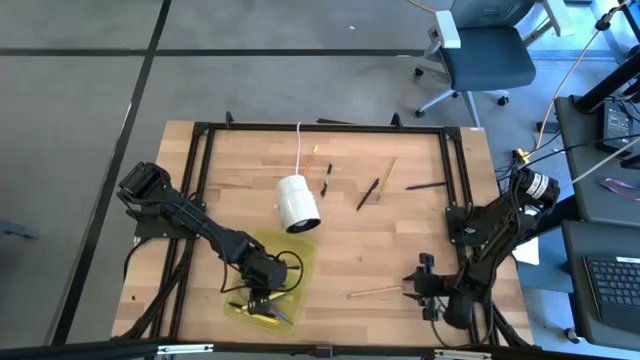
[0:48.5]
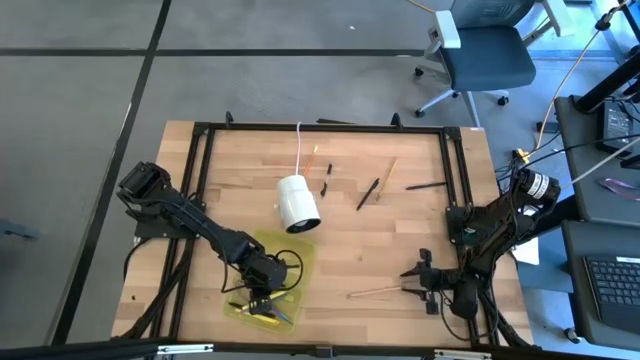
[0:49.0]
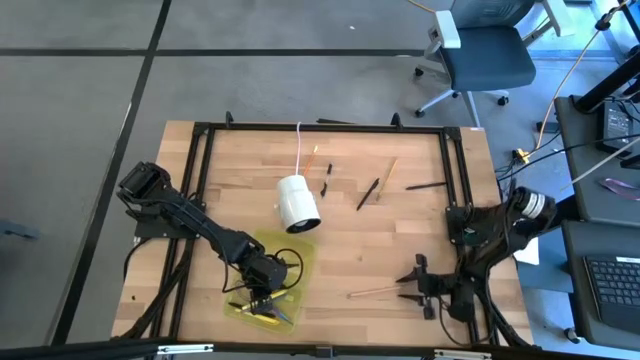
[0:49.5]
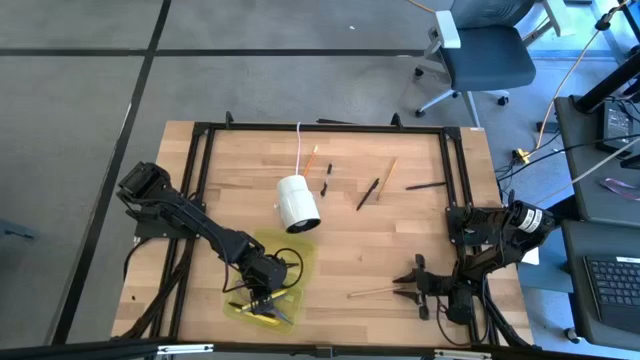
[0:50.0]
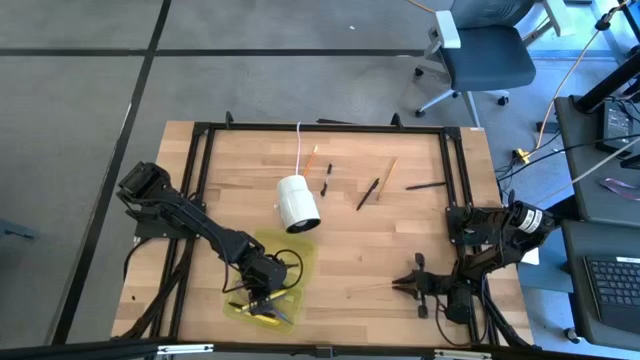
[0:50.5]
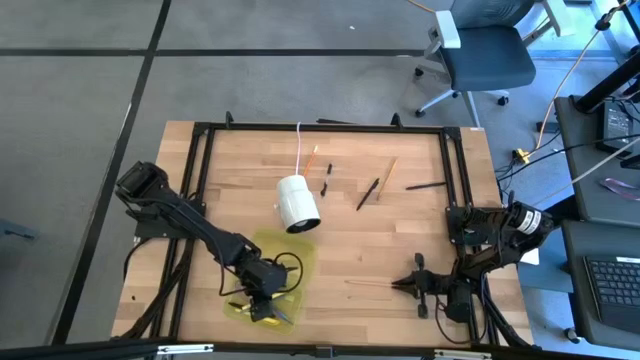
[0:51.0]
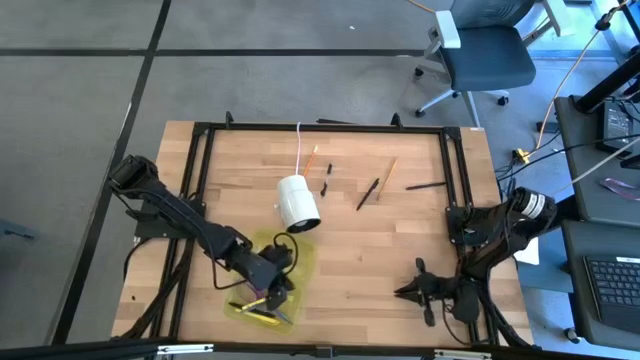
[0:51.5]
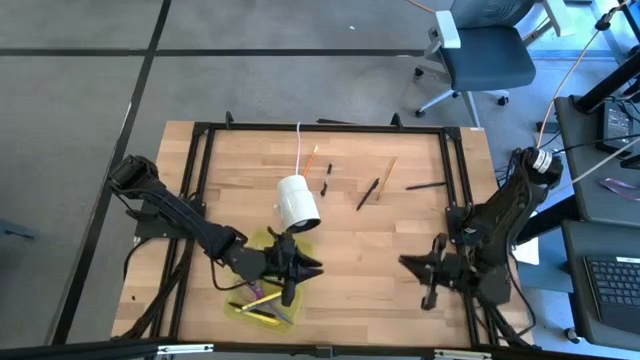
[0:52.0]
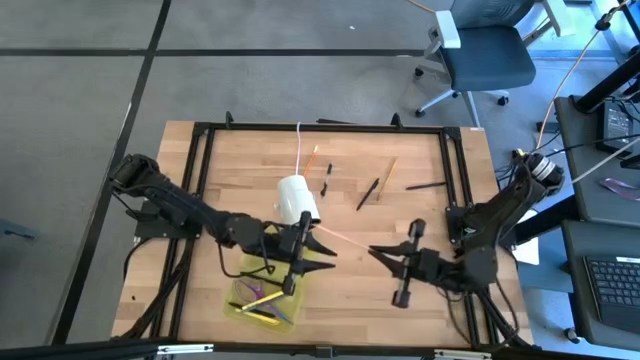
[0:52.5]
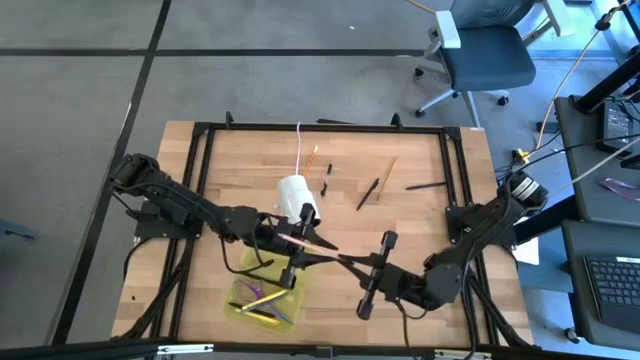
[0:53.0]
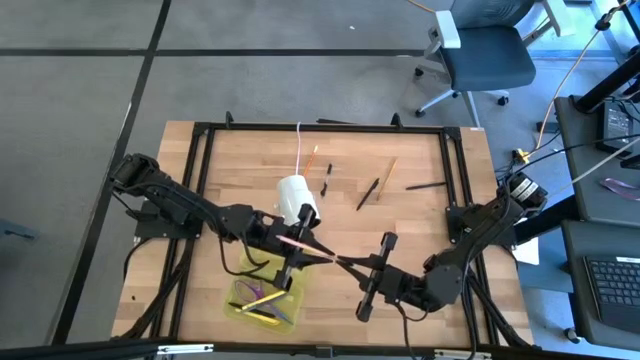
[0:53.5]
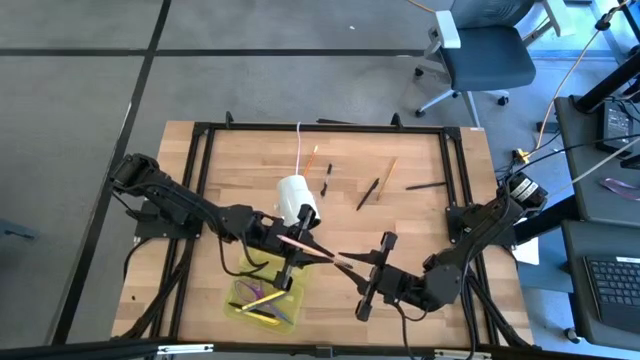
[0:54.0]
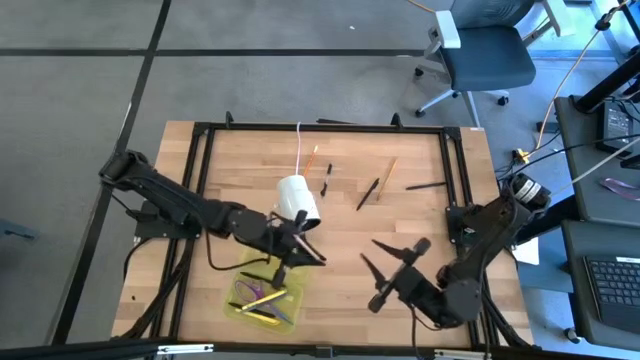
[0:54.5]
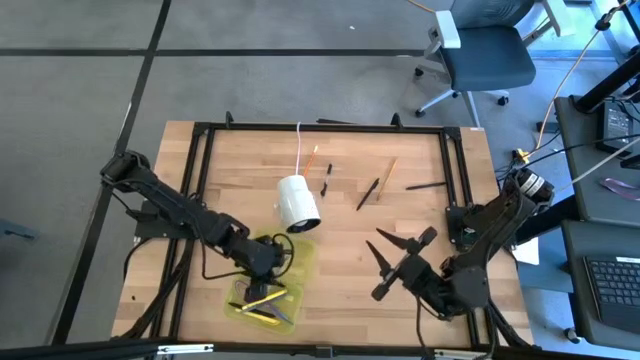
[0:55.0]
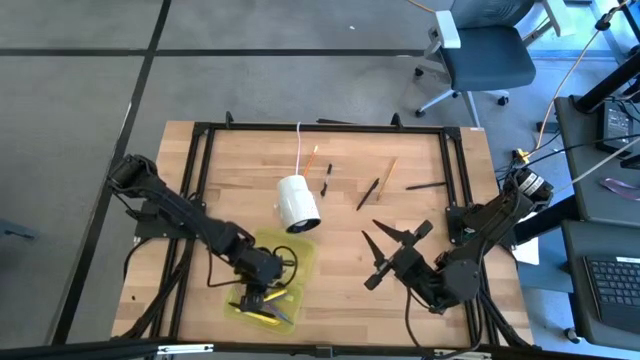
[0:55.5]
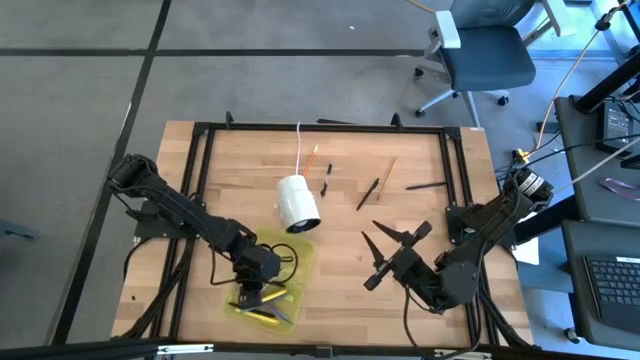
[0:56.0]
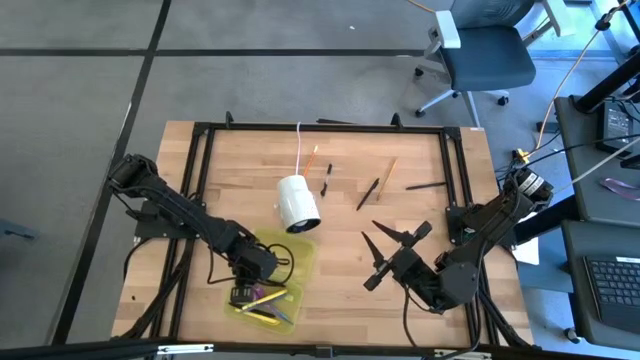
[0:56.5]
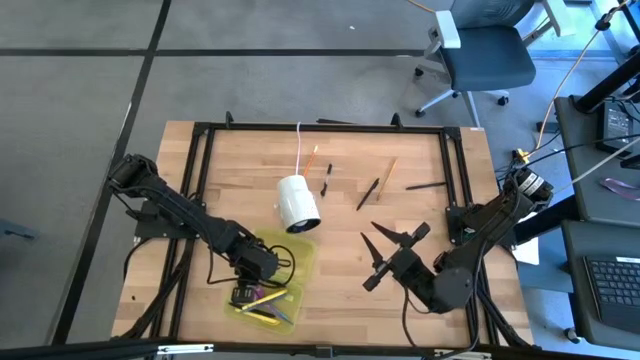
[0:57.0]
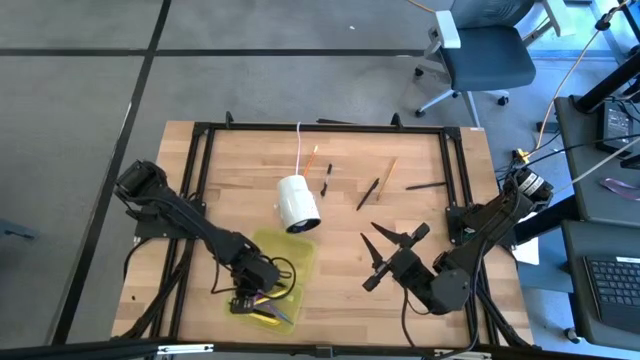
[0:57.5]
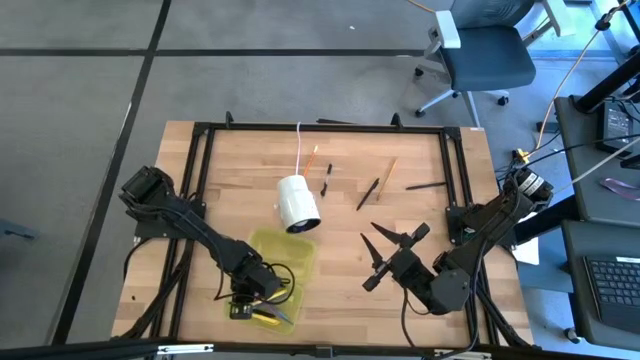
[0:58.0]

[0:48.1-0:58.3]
Task: Pick & place school supplies into a supply box
Put the wood pencil into the supply box

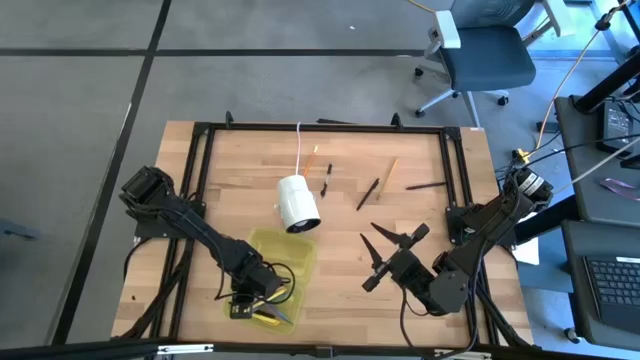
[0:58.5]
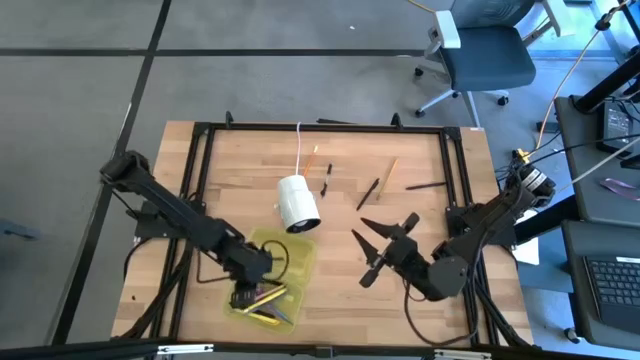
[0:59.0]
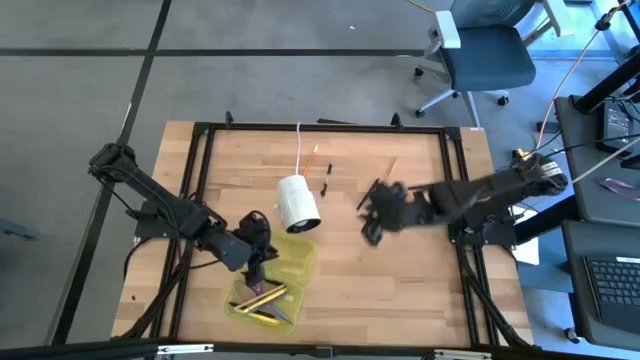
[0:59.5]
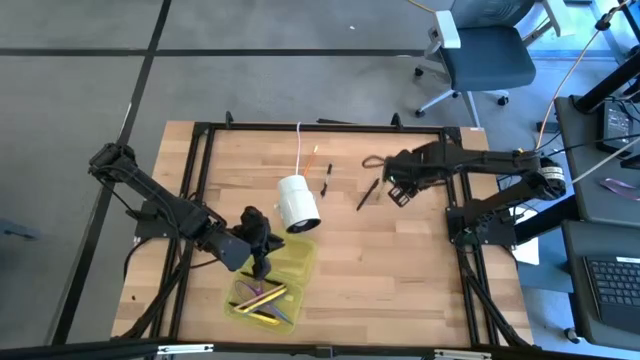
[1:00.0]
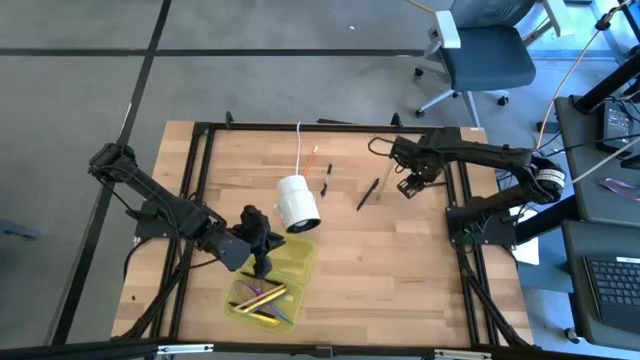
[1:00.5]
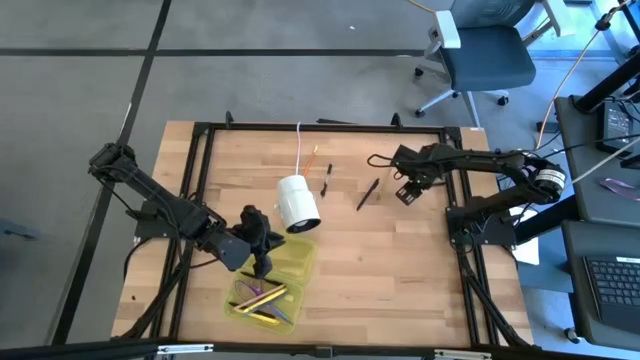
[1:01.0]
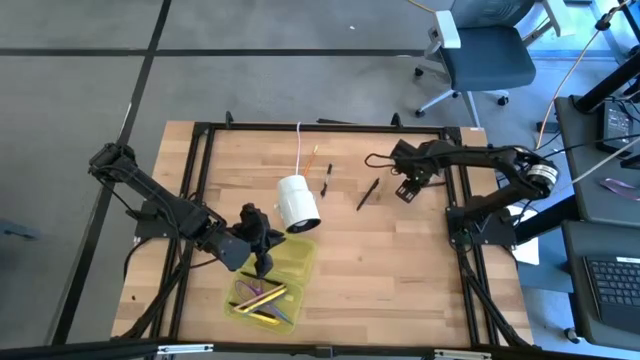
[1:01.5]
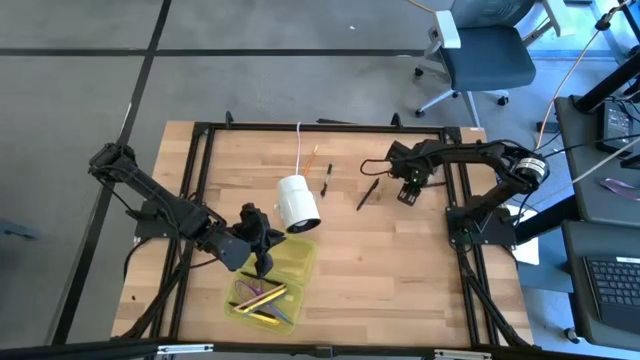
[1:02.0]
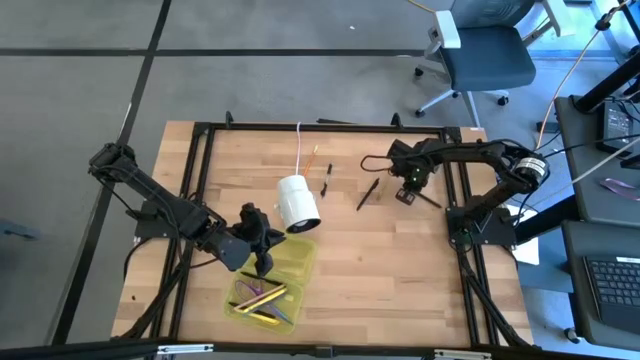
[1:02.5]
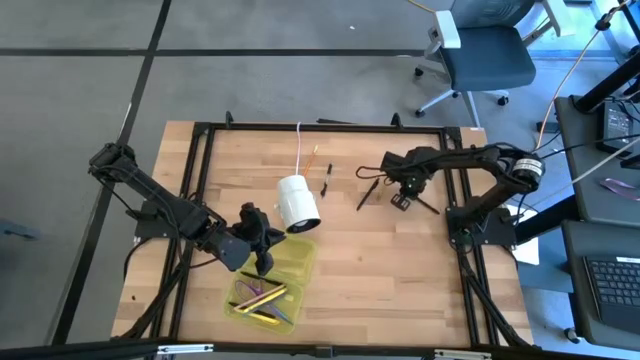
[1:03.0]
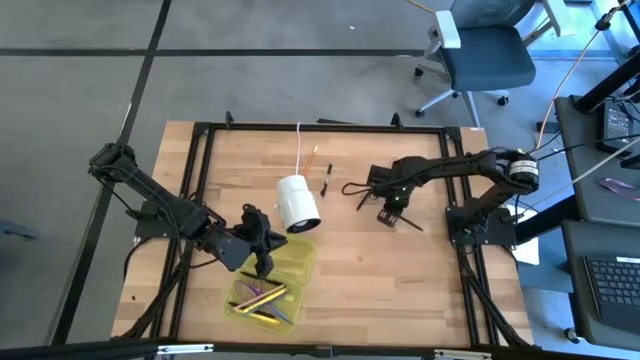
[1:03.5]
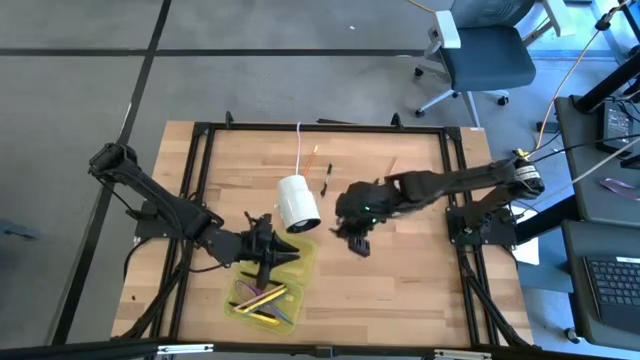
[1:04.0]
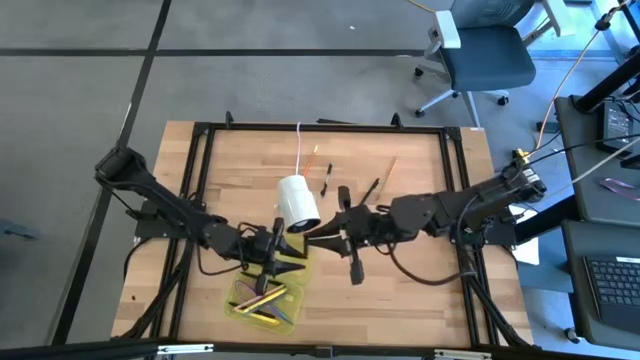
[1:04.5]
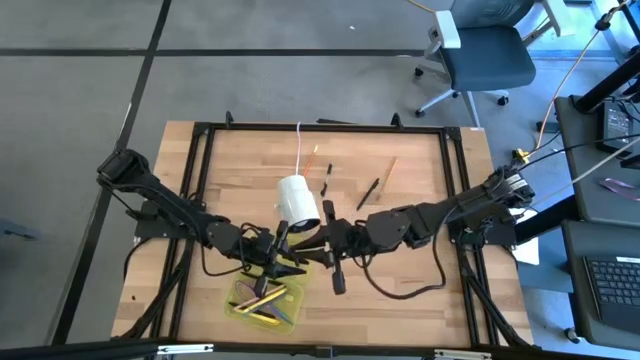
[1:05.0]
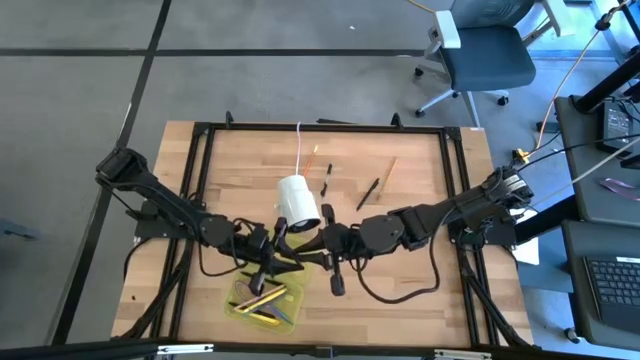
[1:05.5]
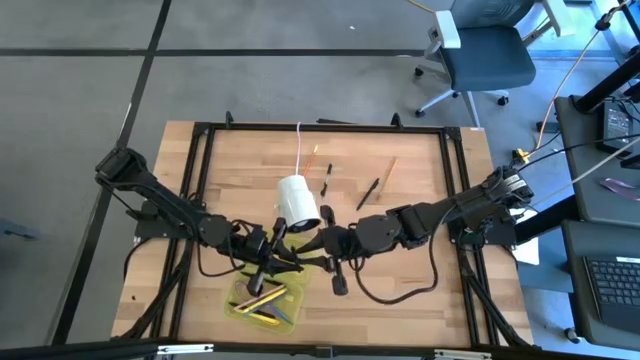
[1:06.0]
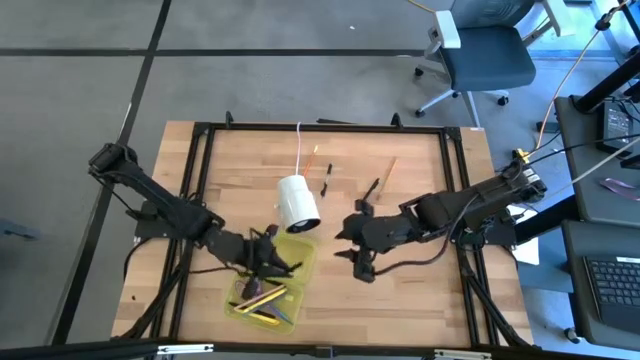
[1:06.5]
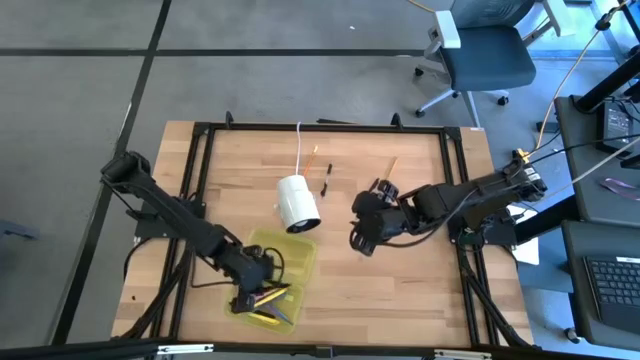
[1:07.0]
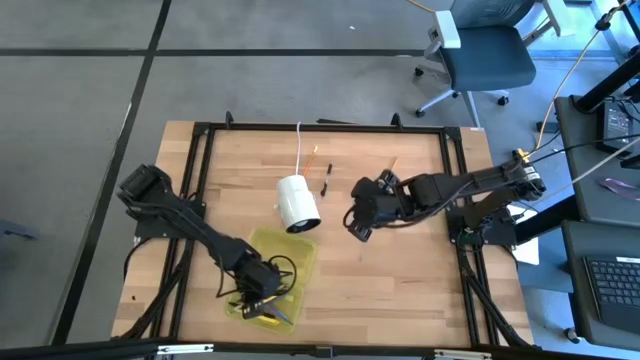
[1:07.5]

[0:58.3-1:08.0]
Put the black pen into the supply box

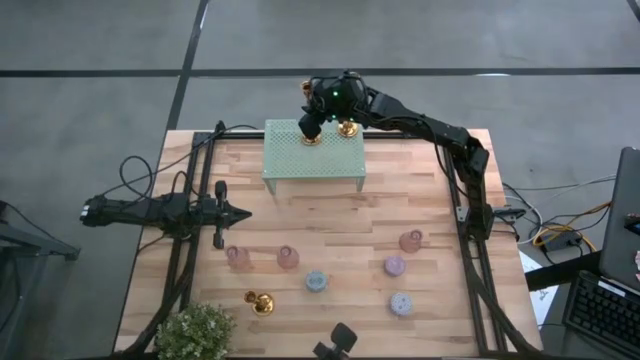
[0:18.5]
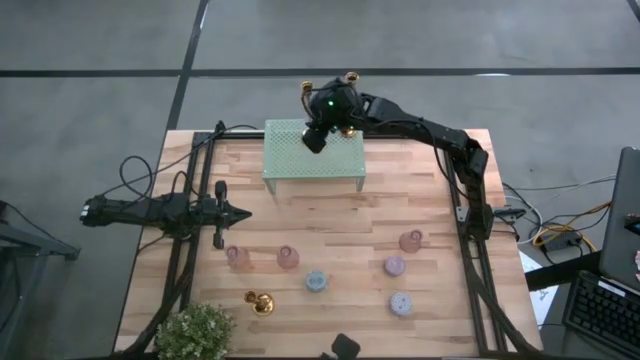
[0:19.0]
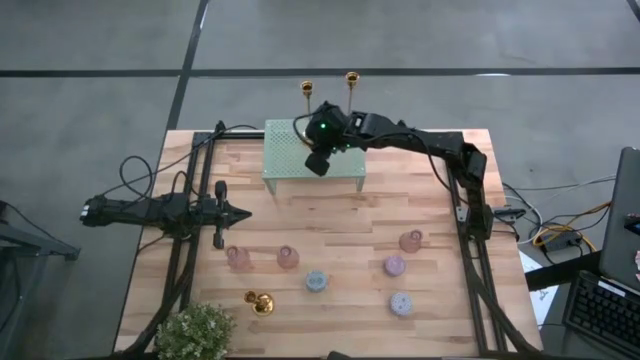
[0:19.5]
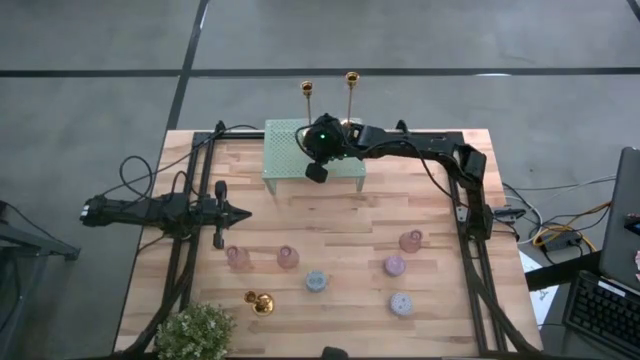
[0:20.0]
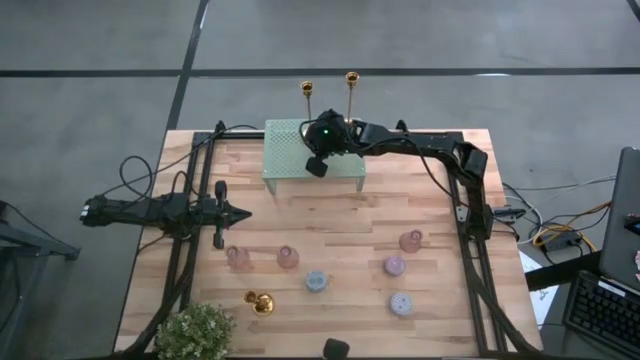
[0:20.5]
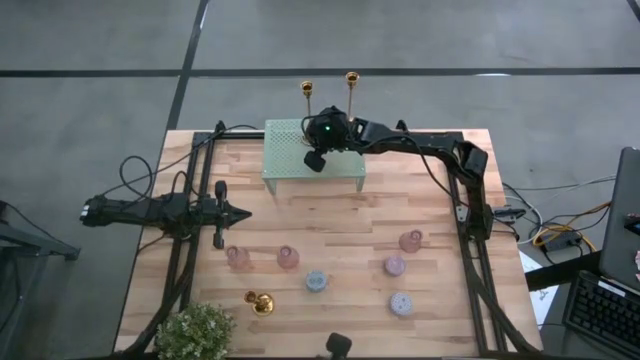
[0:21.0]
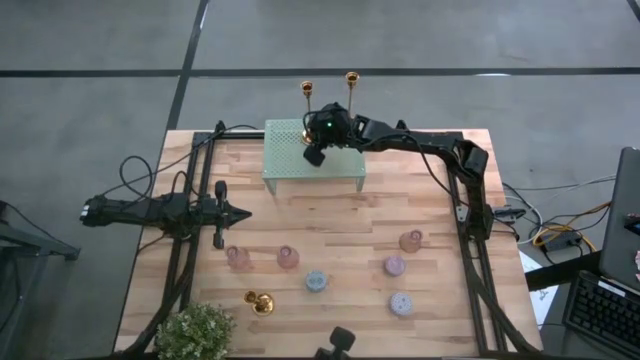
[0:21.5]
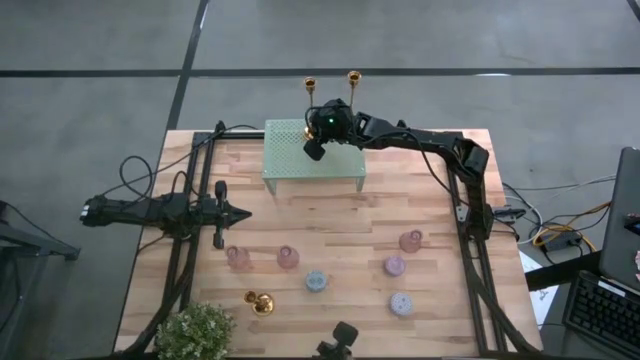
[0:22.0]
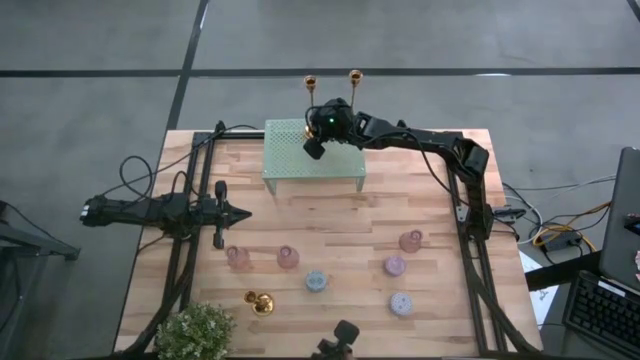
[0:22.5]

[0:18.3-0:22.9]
Task: Pick & Place candle stick holders
Adjust the gold candle holder on the shelf
